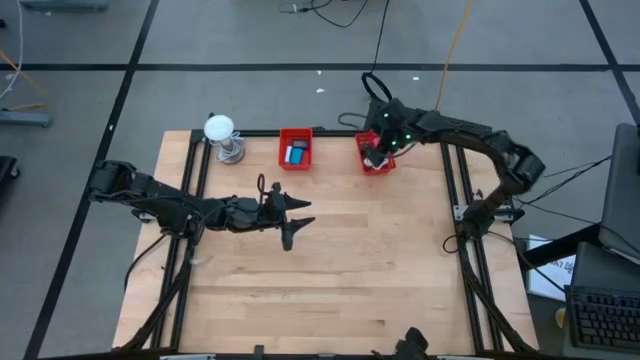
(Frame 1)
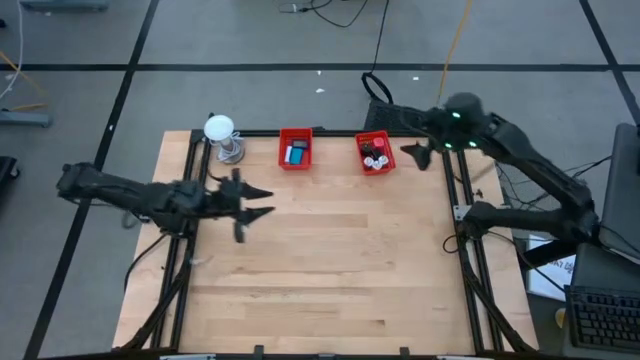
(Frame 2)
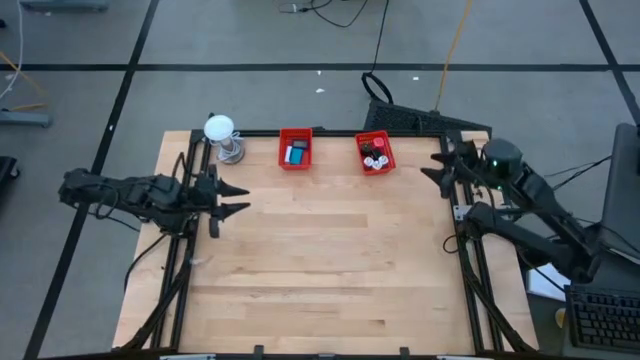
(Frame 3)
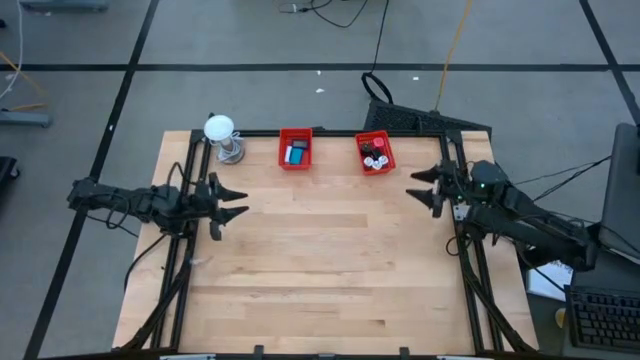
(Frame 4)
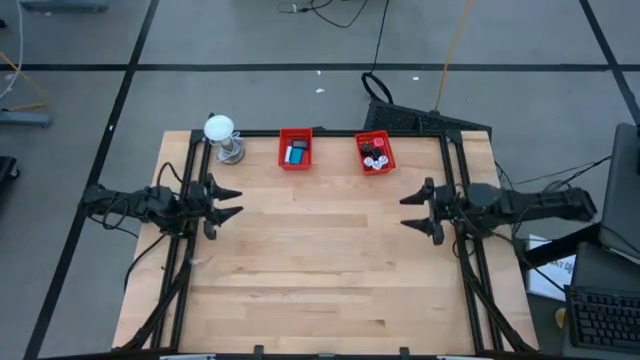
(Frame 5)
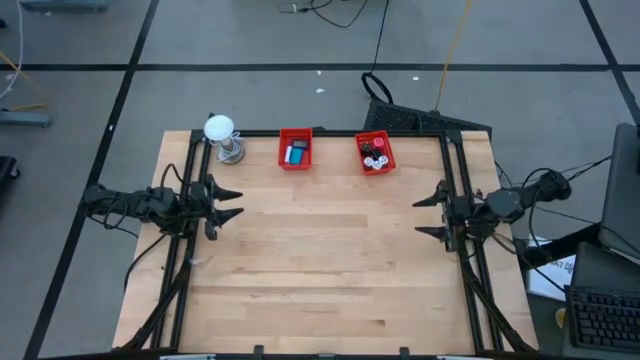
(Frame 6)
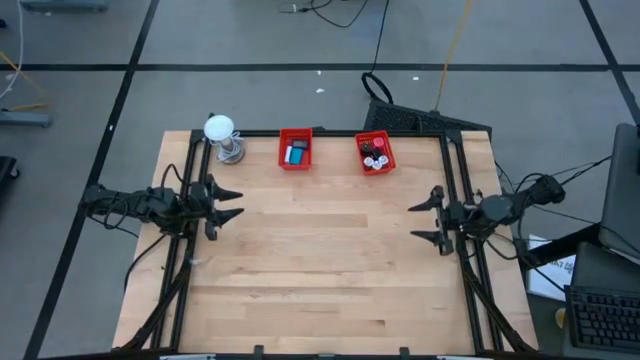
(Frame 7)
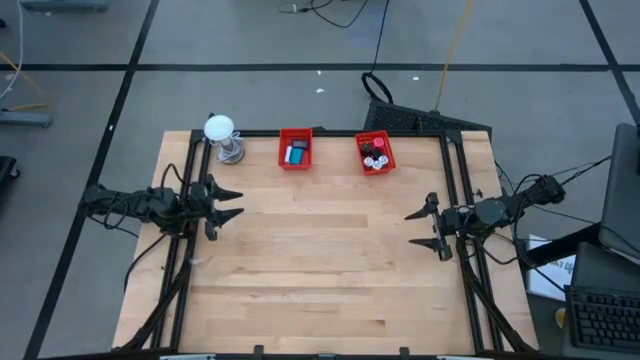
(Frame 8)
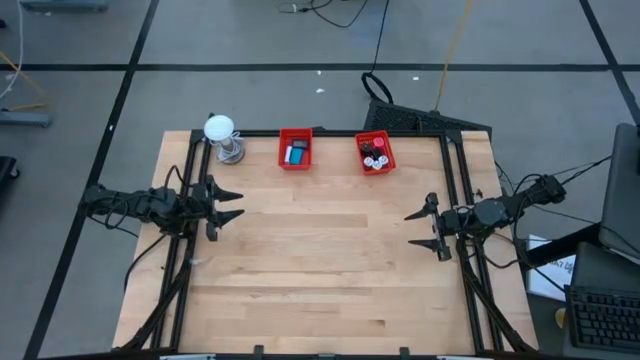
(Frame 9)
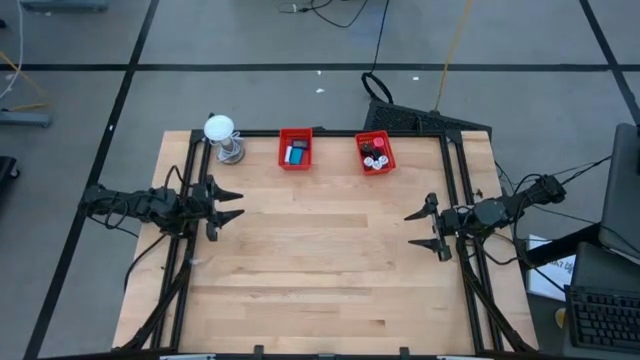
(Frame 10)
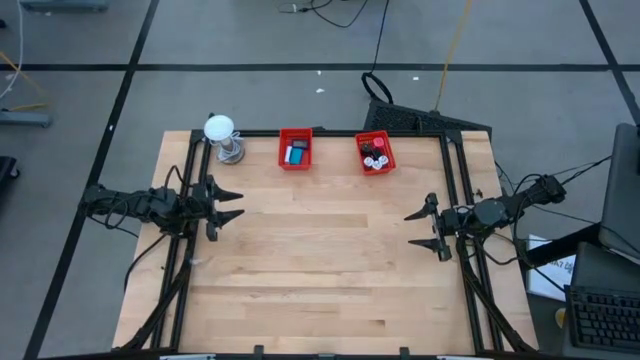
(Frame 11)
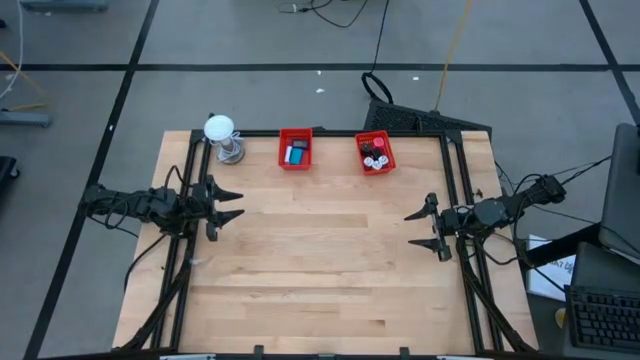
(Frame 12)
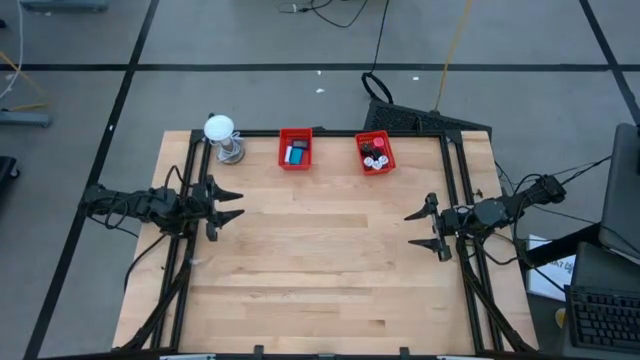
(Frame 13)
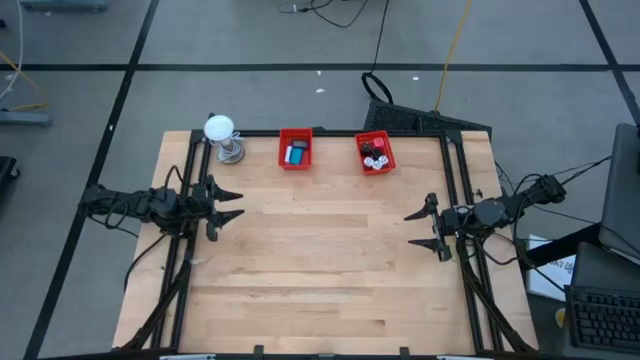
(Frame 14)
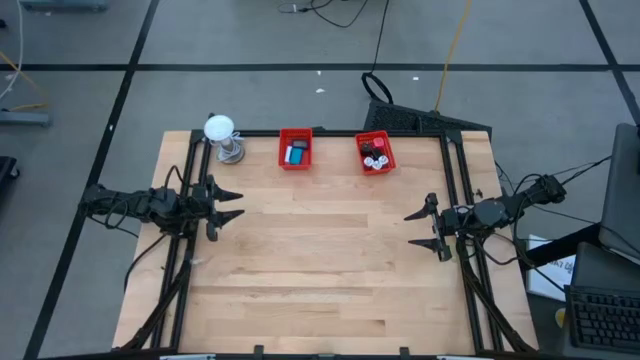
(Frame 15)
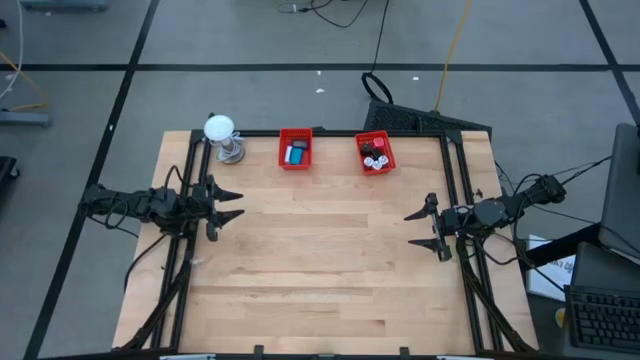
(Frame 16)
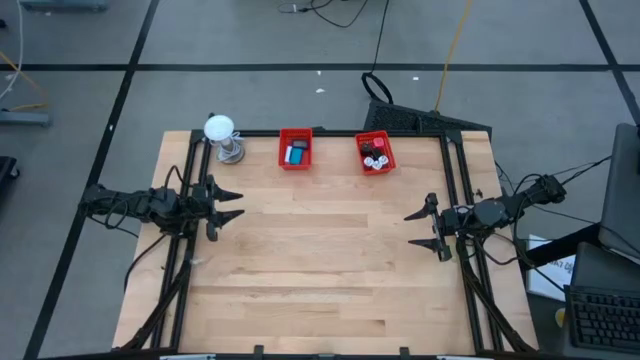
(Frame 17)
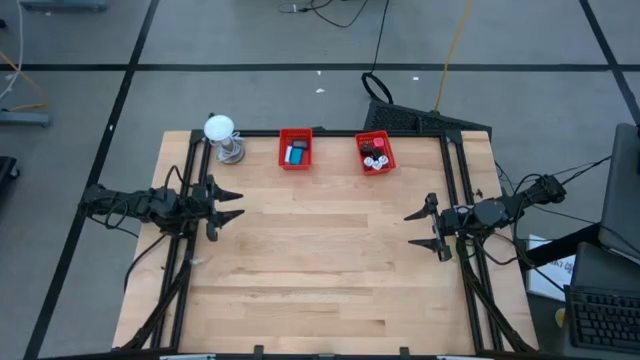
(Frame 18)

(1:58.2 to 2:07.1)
Task: Pick & Place Office items
Return to Home Position

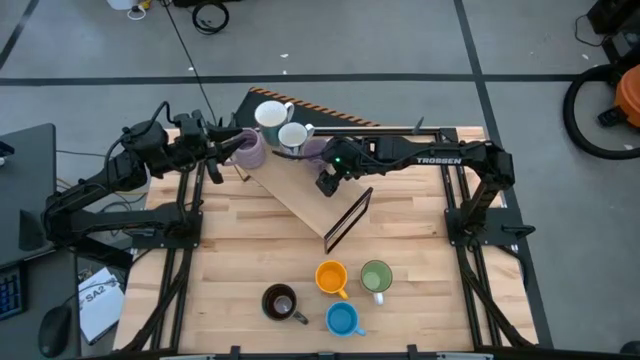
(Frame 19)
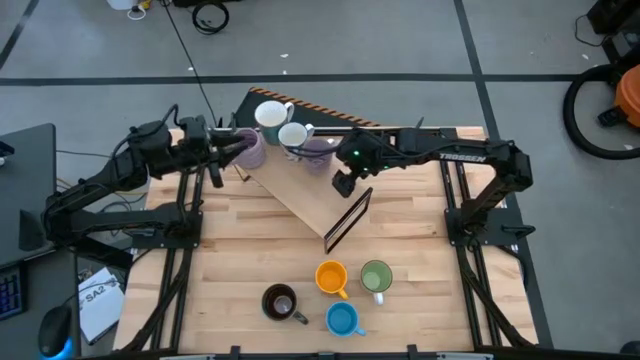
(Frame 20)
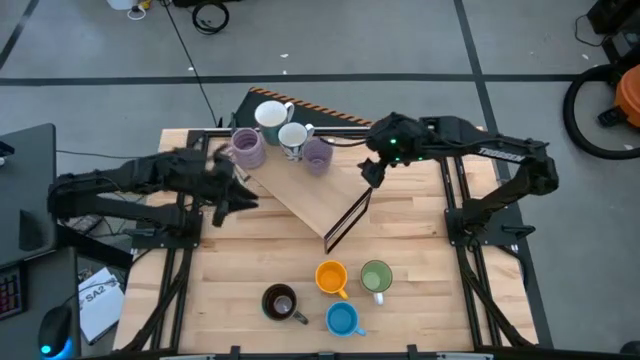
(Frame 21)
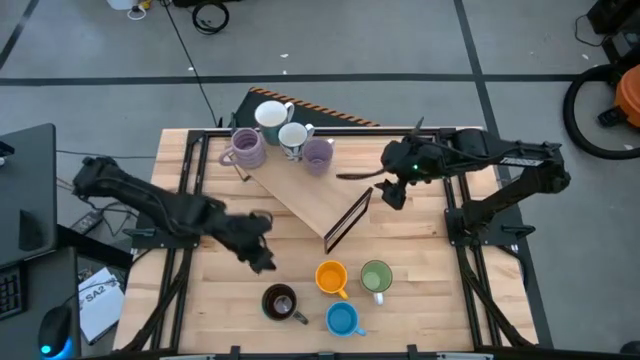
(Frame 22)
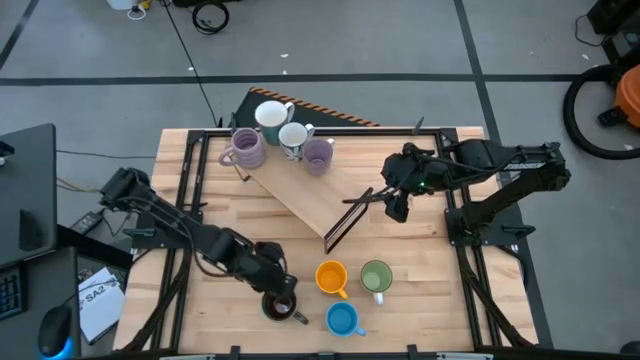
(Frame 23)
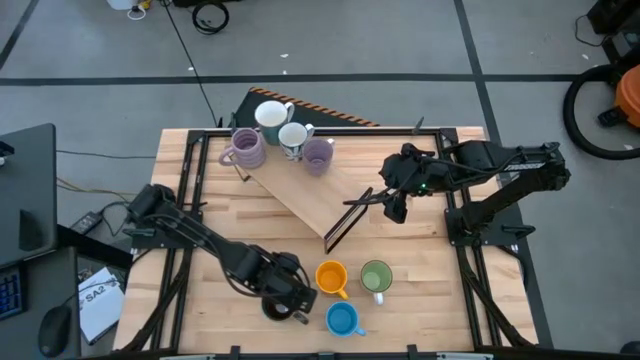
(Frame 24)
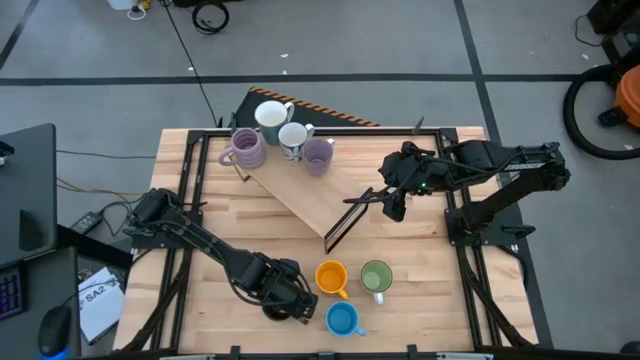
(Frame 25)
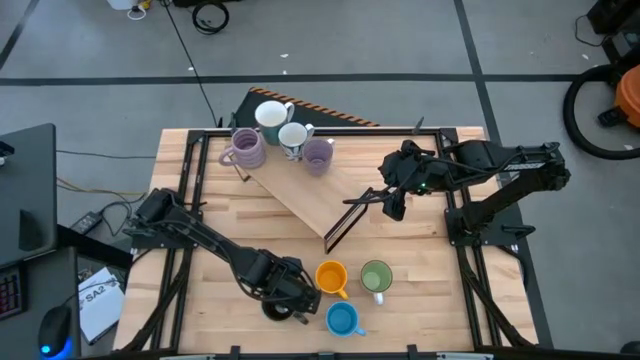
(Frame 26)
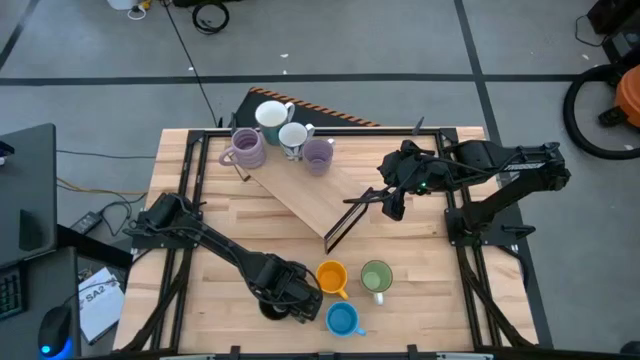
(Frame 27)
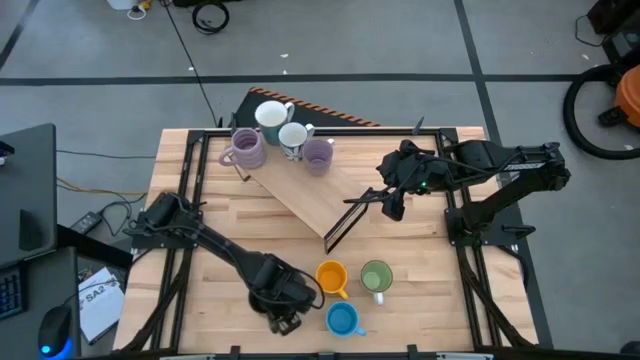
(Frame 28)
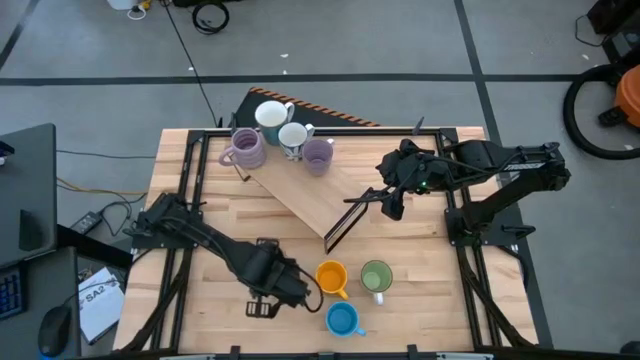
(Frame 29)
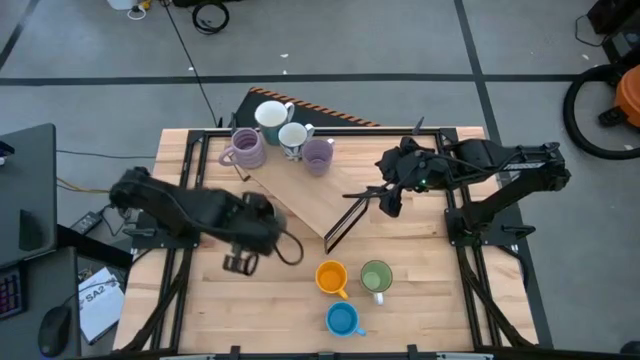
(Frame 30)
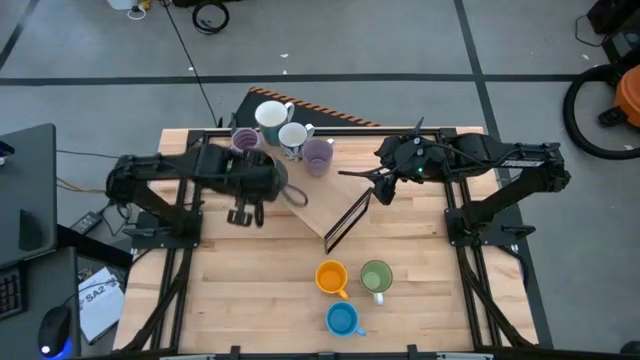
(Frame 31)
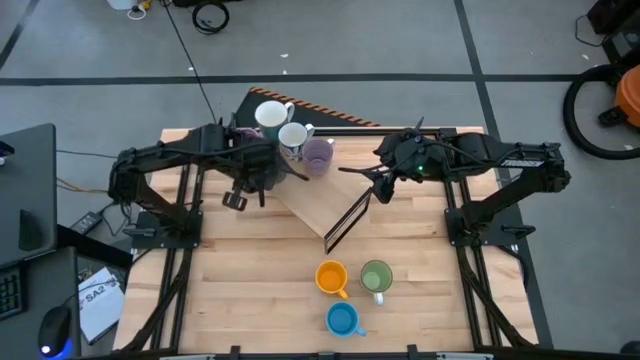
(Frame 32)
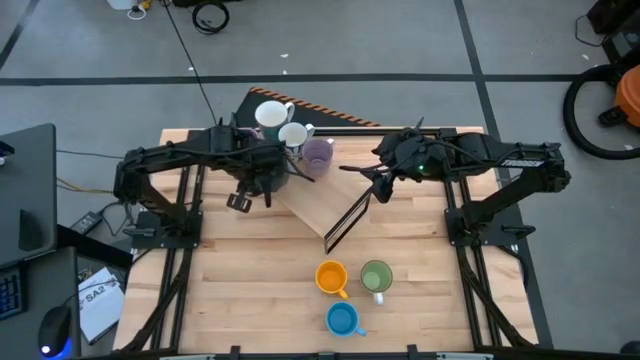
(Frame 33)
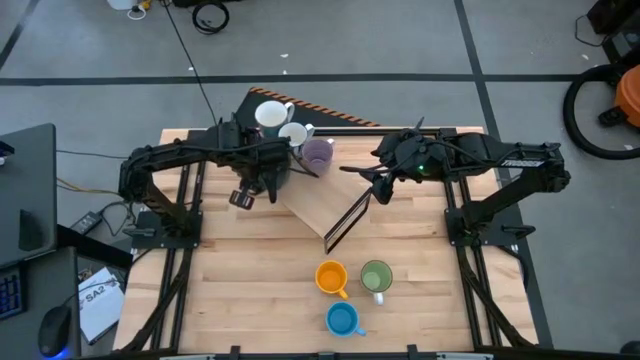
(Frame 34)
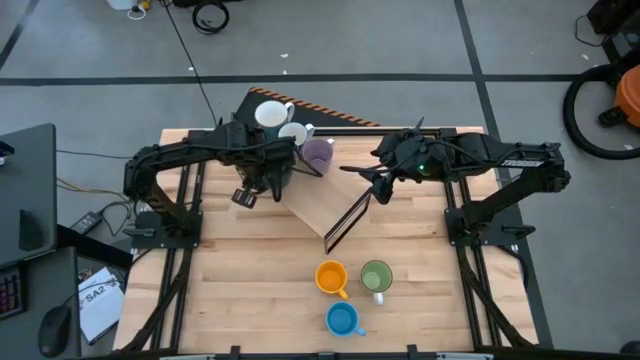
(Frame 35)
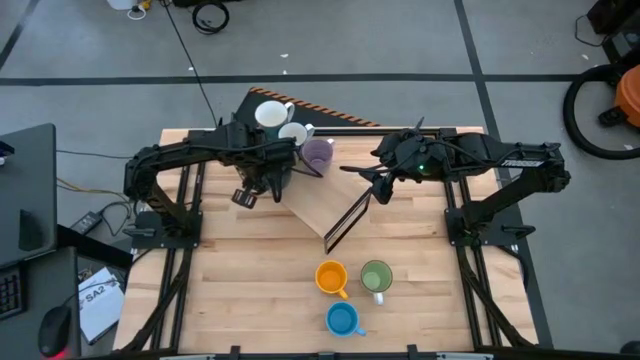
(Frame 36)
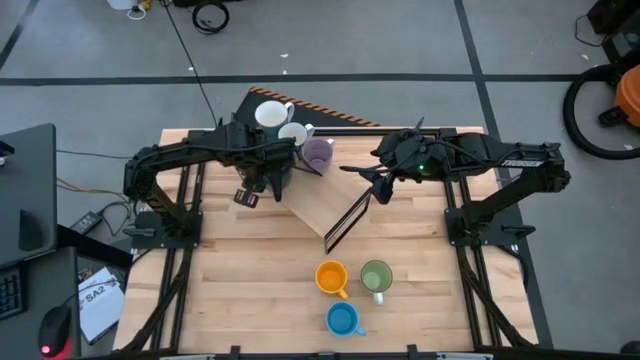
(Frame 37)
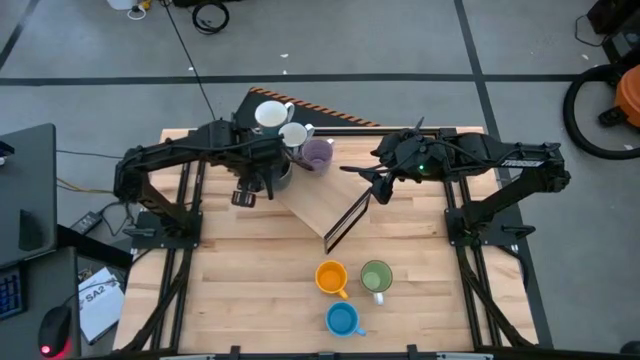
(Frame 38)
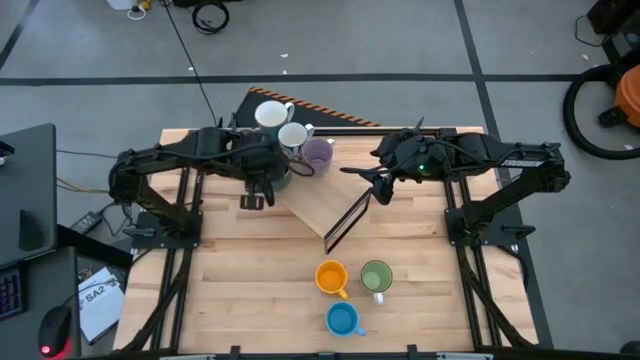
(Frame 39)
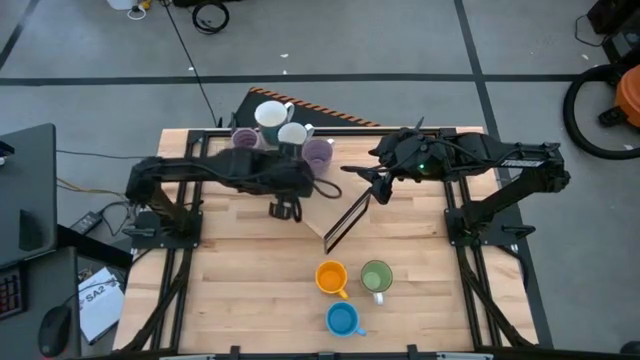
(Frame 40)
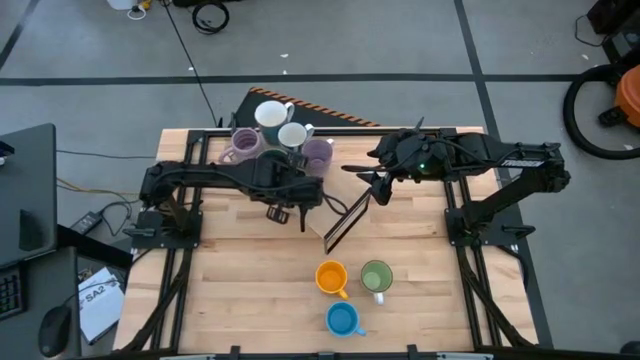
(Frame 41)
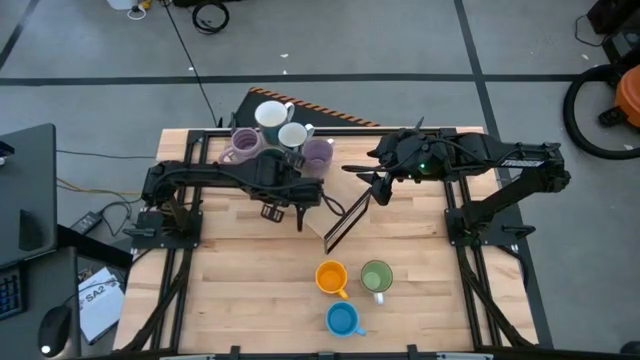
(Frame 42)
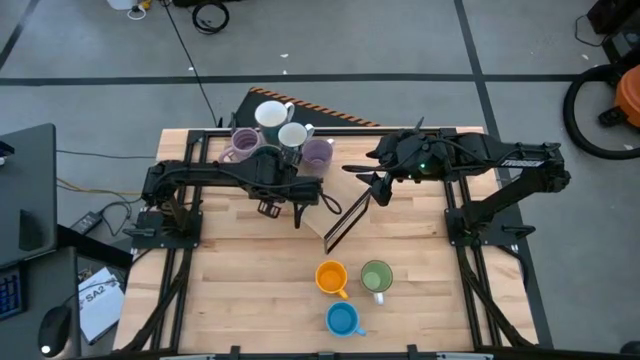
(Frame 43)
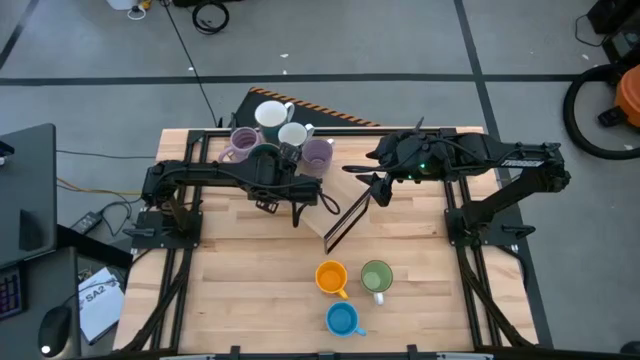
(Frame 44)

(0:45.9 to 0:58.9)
Task: Place coffee mugs
Put the green patterned mug on the shelf
